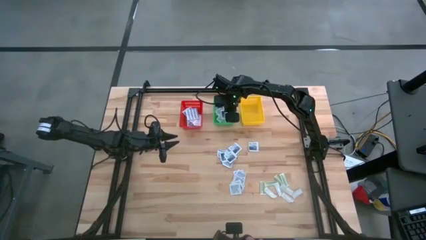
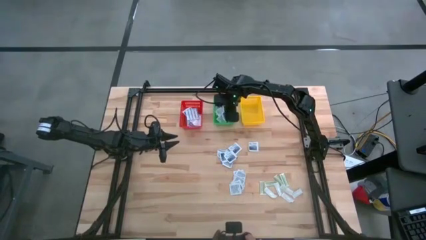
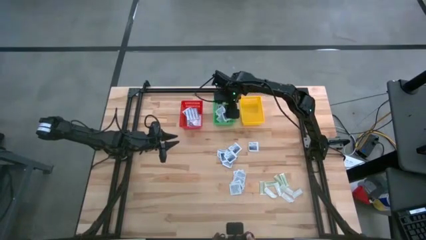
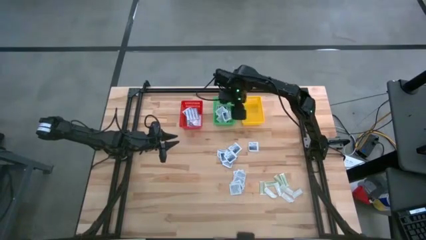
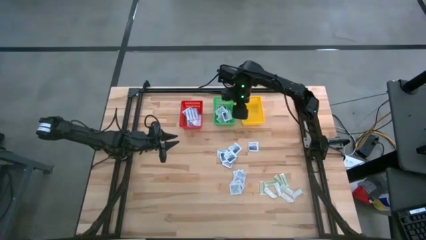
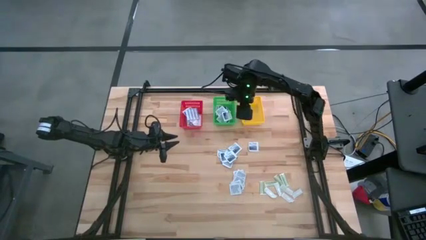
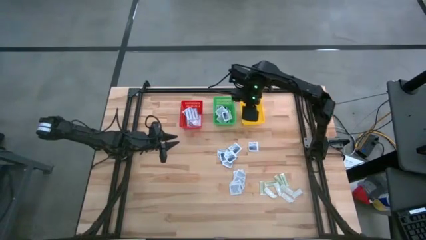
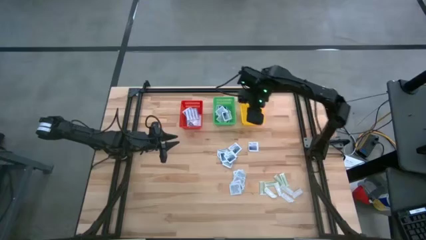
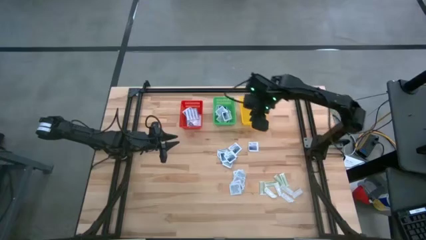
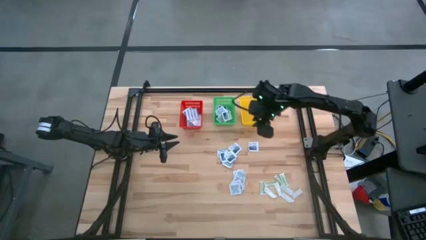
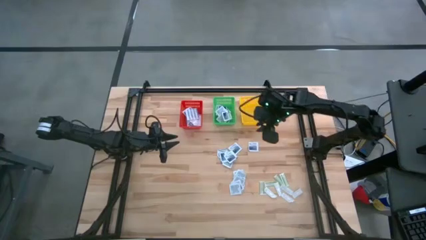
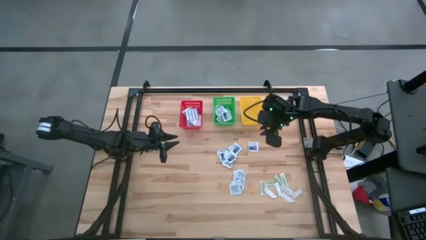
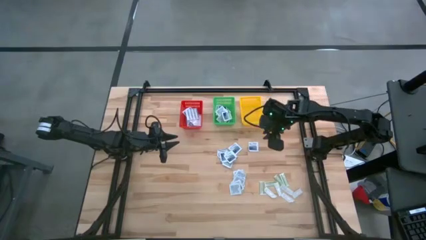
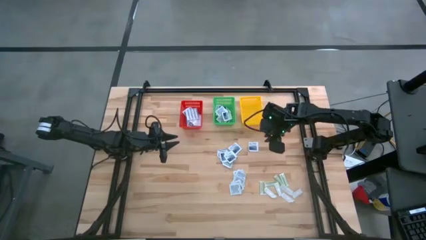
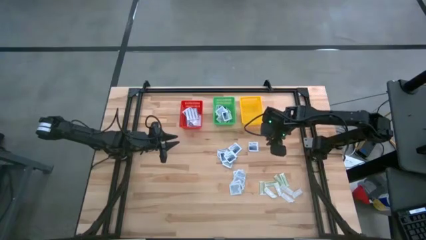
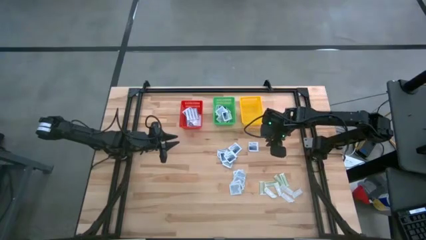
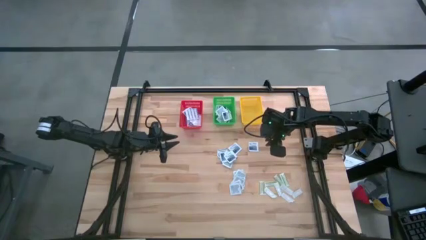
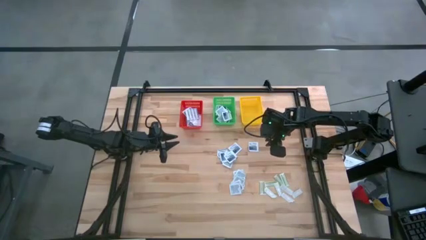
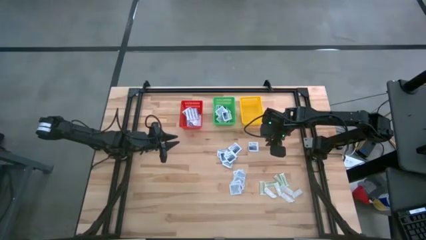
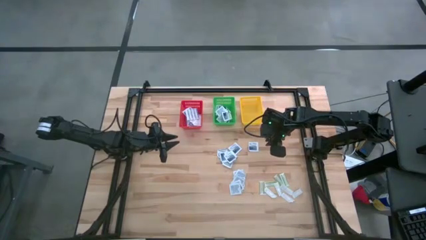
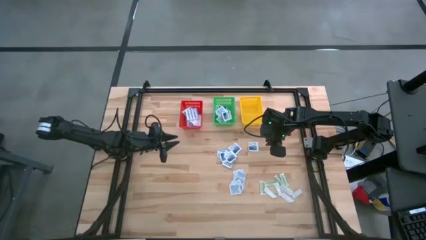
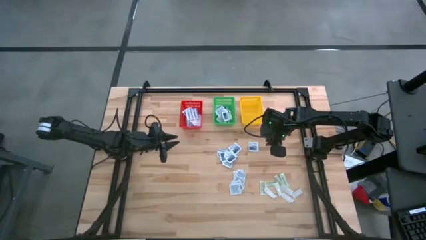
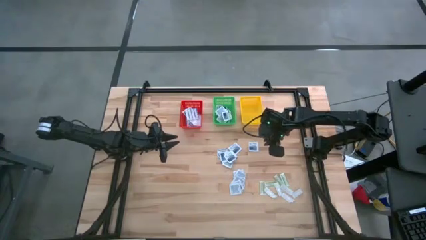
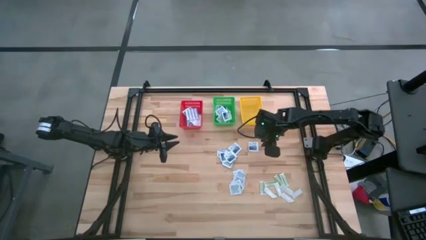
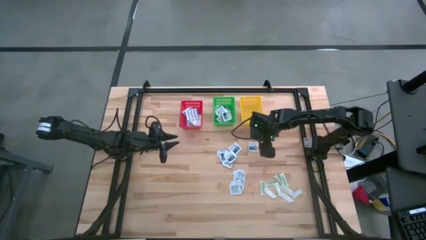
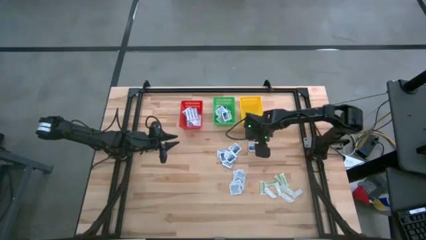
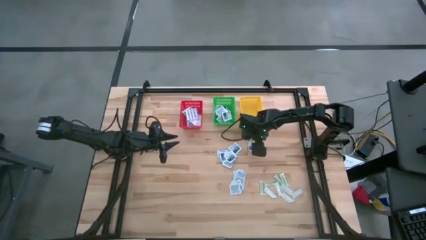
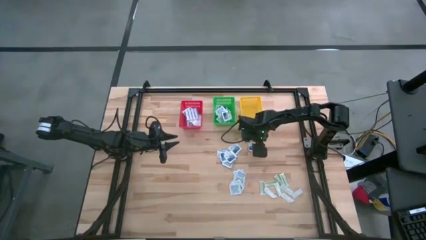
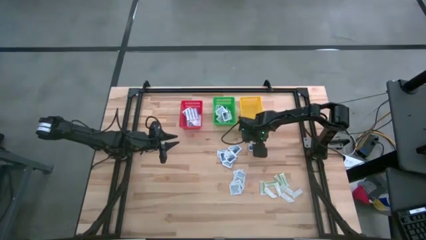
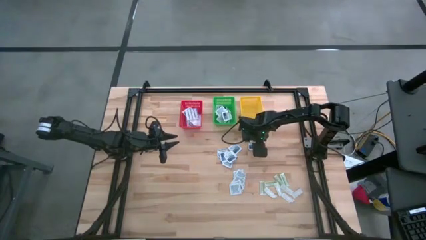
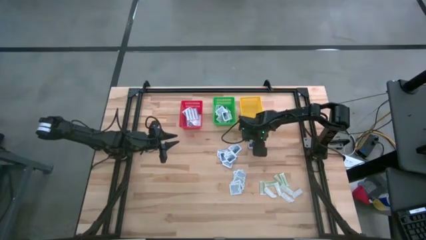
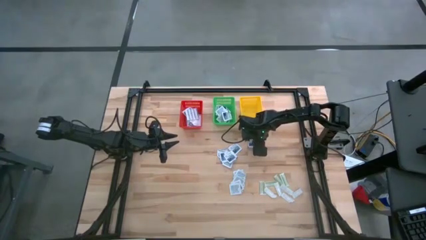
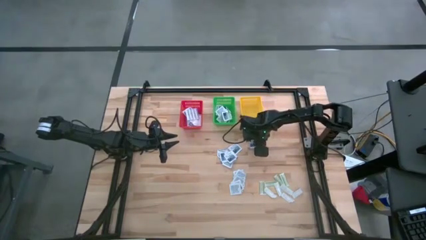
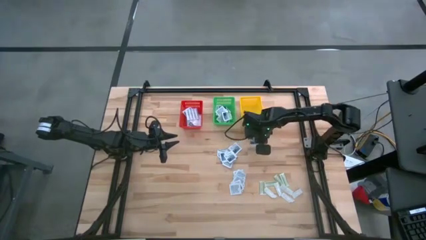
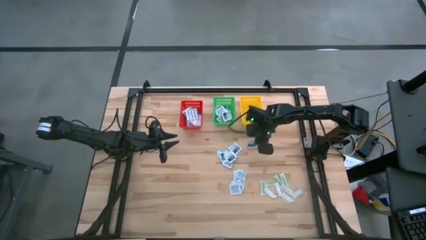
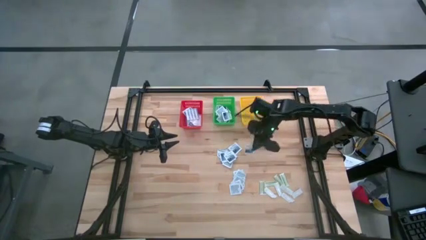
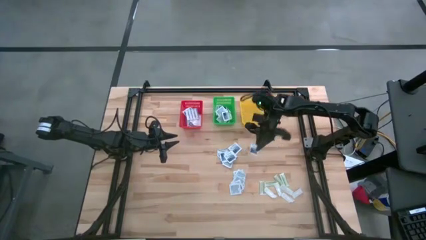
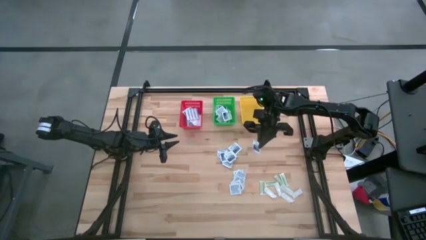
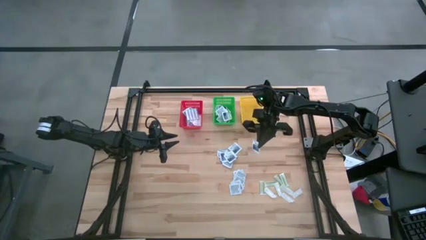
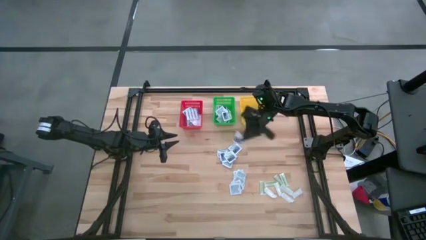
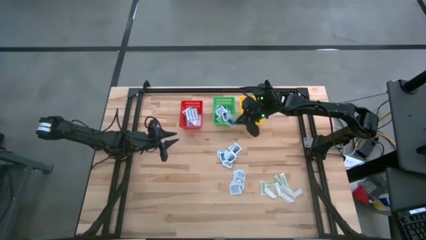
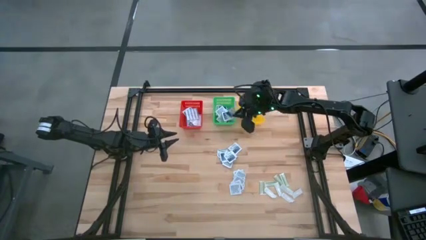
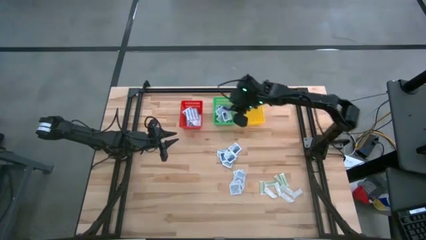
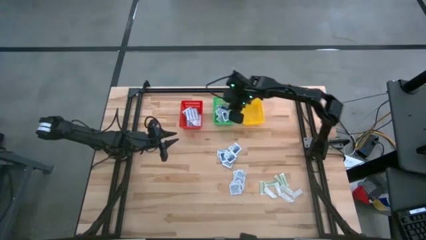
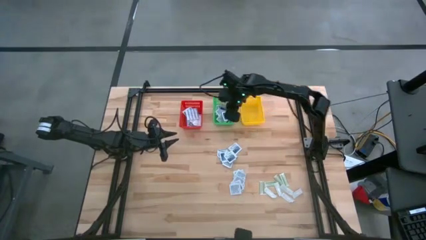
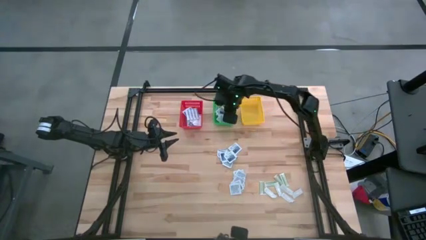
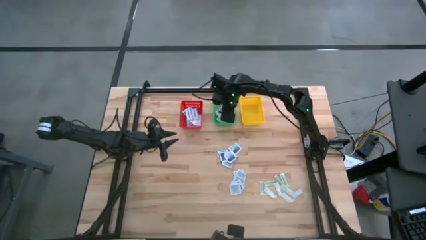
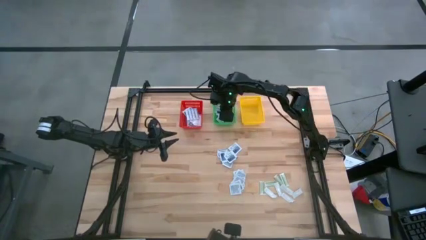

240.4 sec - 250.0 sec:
Task: Pick & Place First Aid Supplies
Put the alcohol pad into the green basket

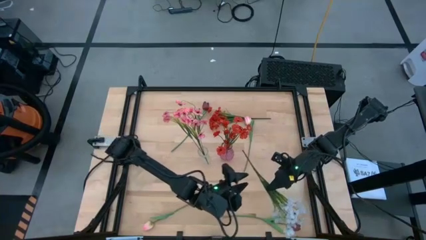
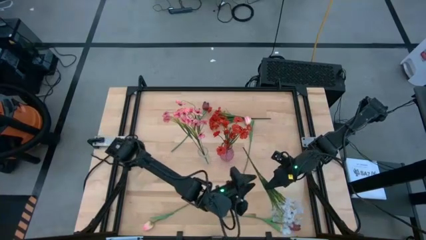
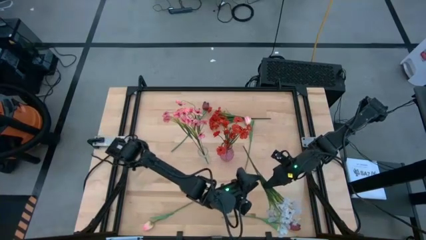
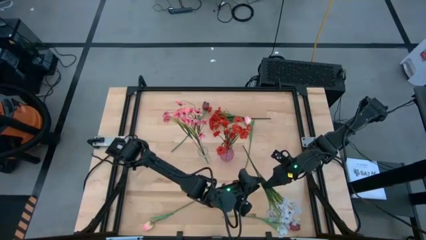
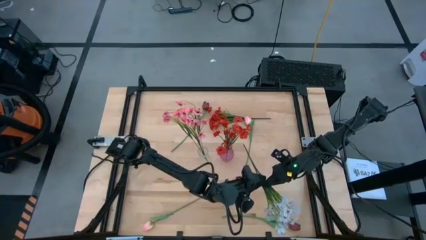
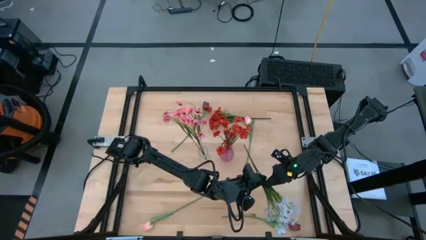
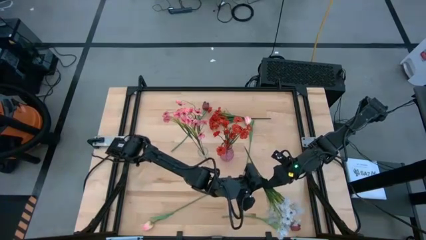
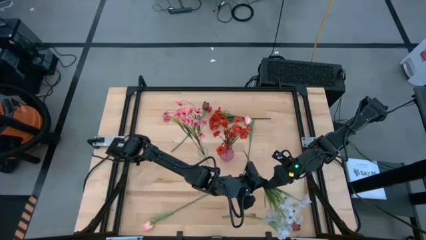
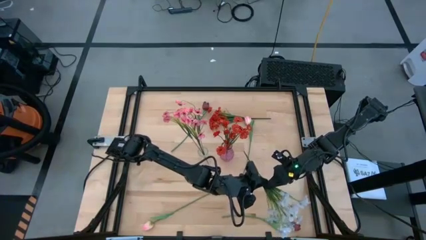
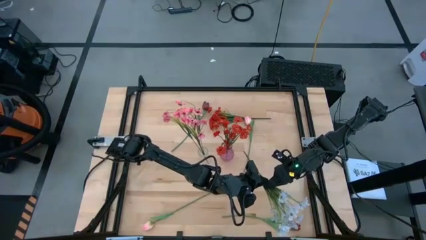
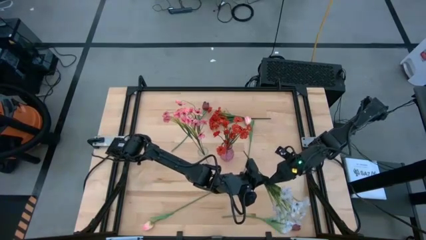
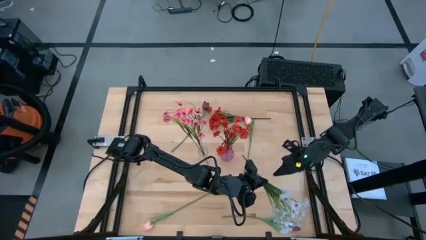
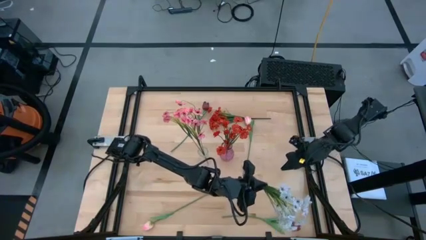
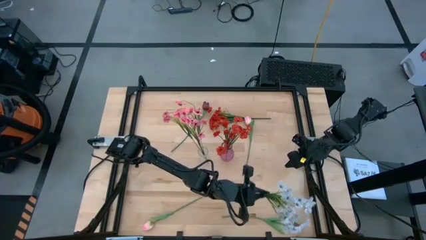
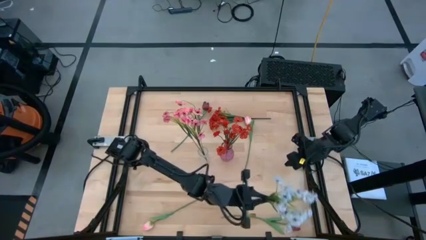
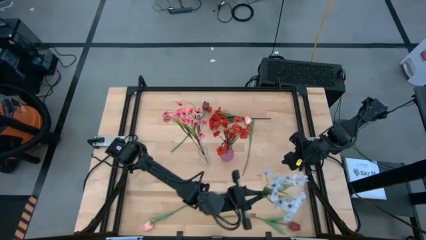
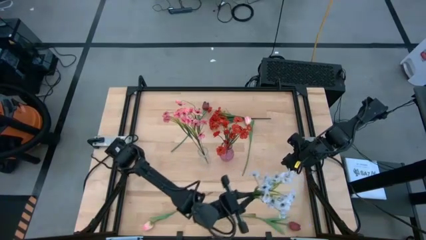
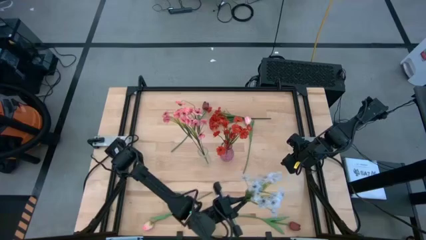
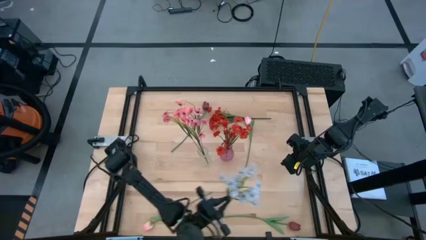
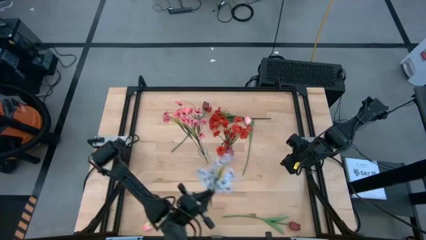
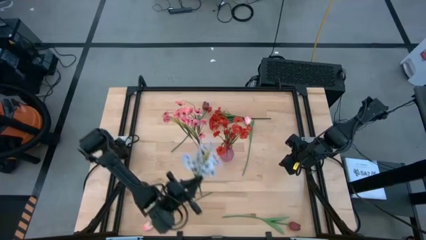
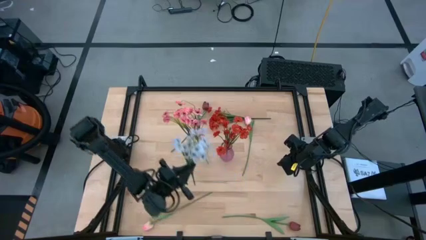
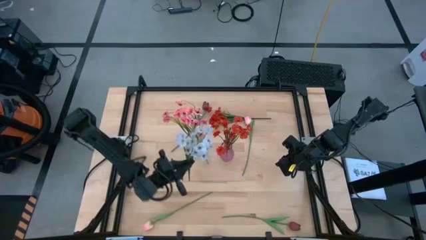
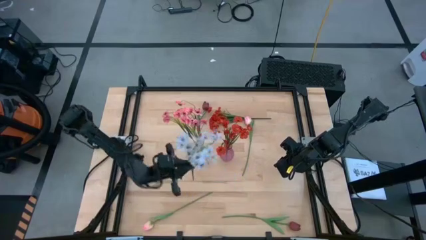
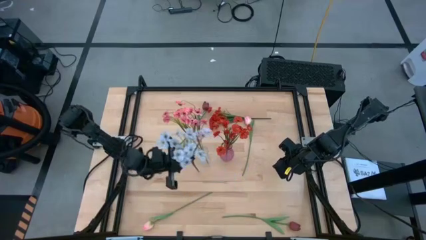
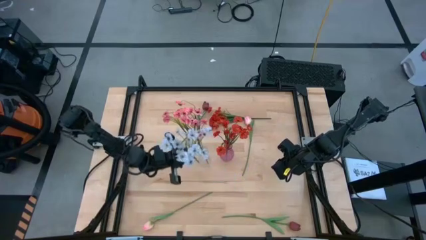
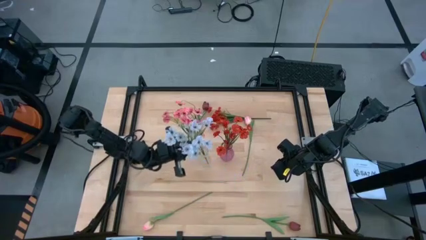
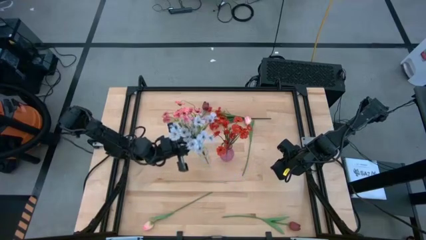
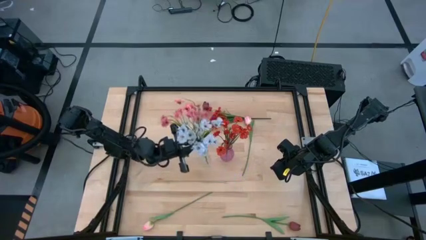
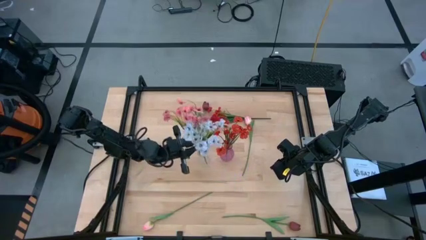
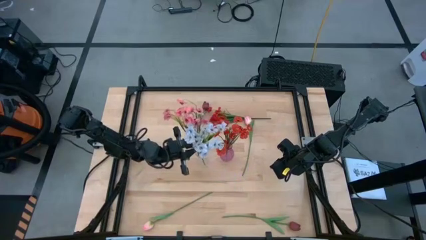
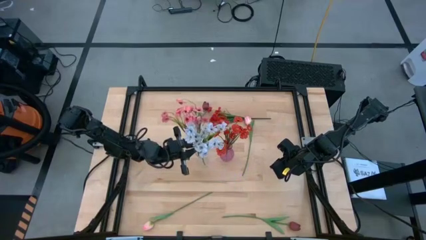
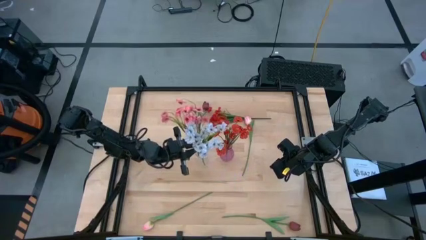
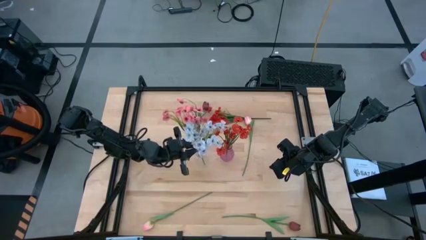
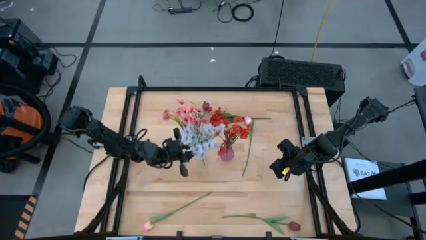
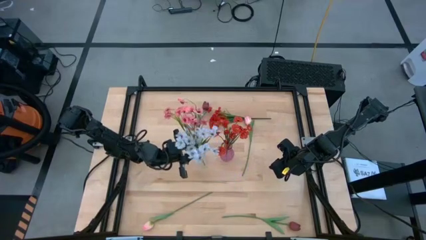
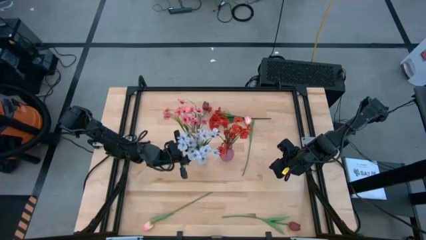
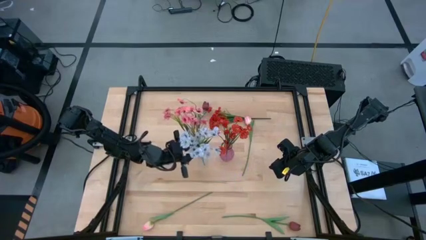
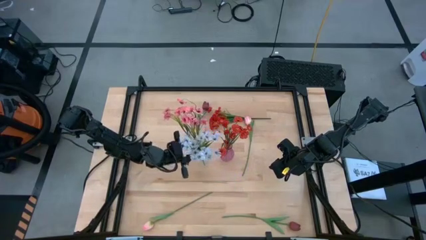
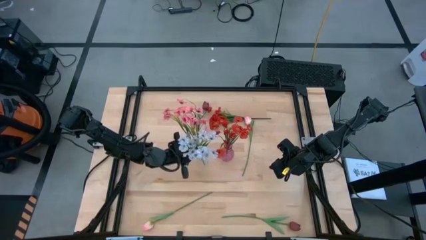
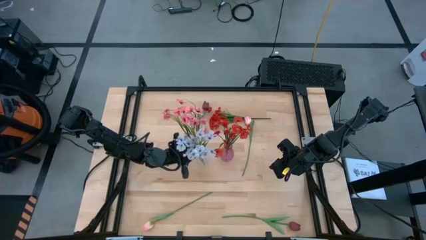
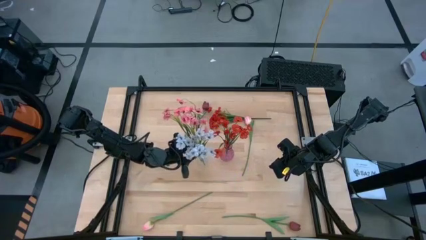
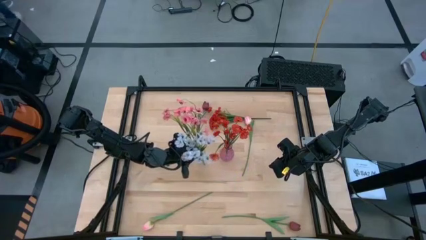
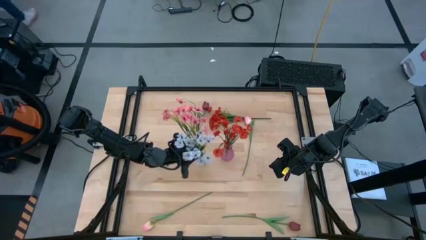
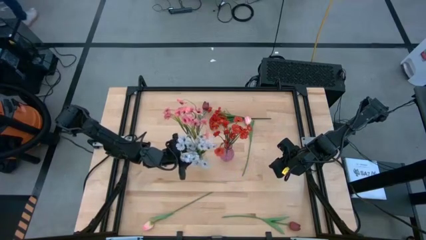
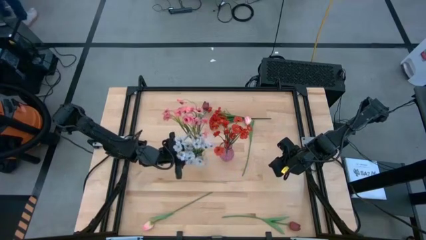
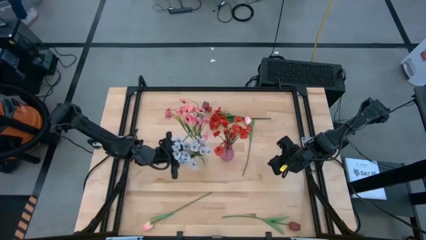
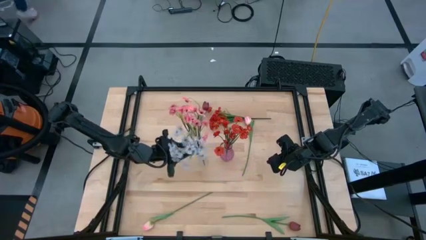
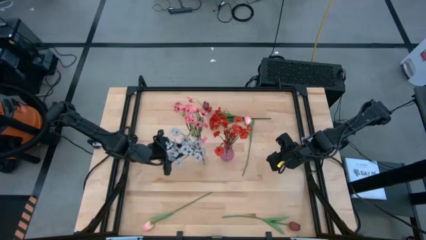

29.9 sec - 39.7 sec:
Task: Sort flowers into vase by color
Put the white flowers into the transparent vase
